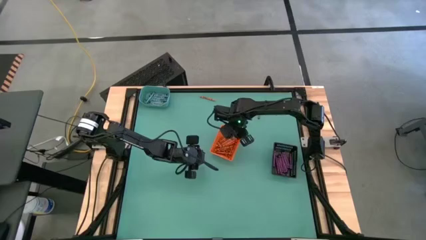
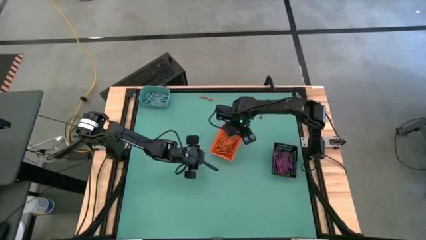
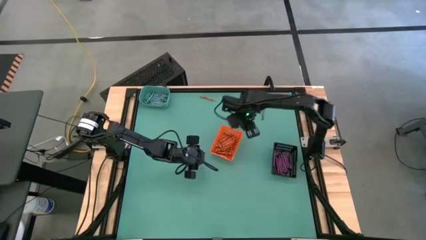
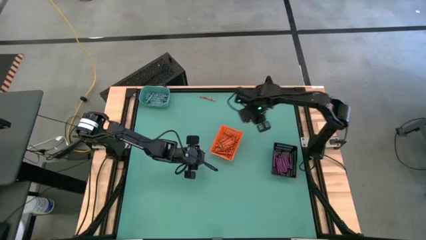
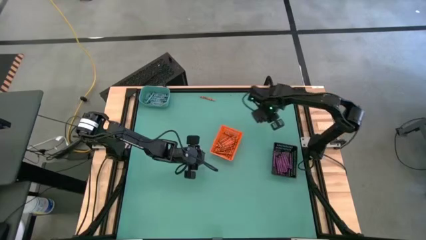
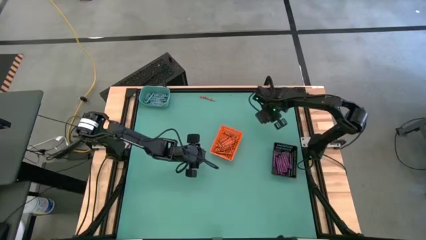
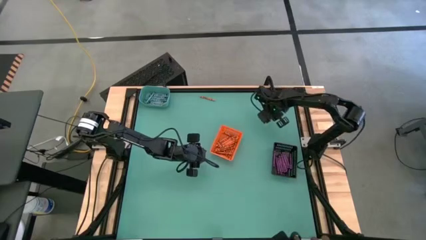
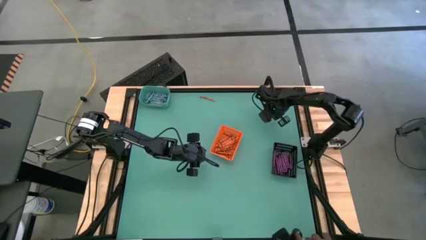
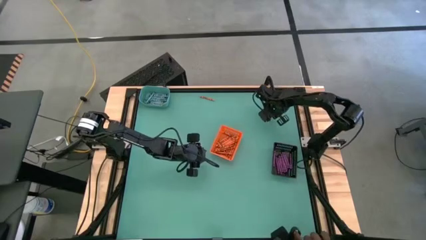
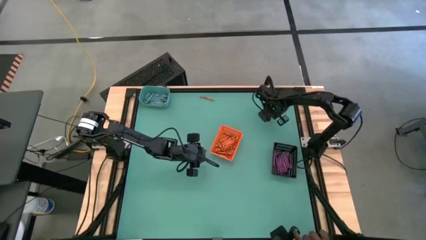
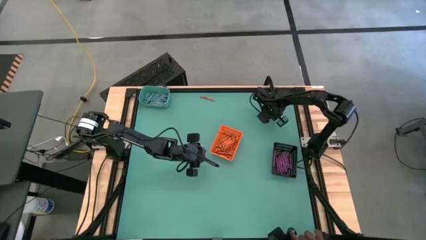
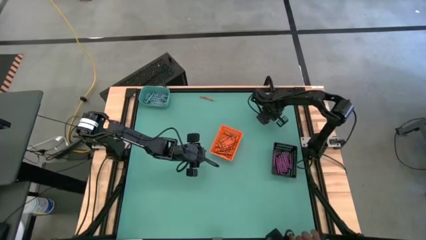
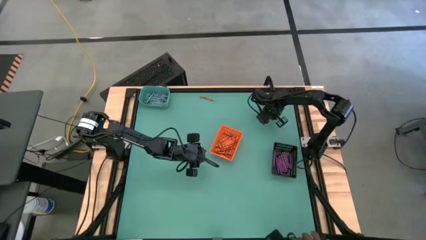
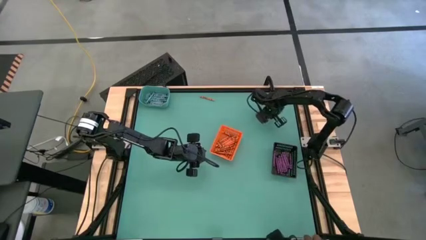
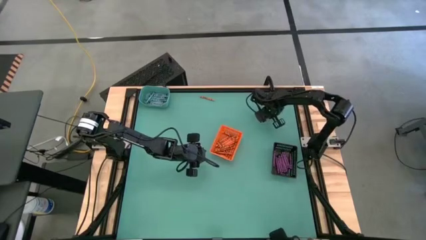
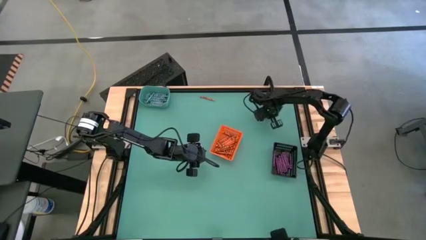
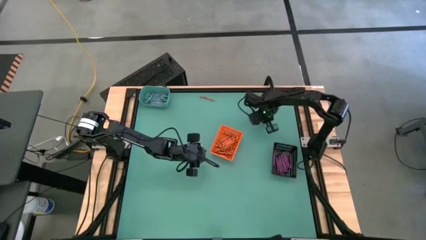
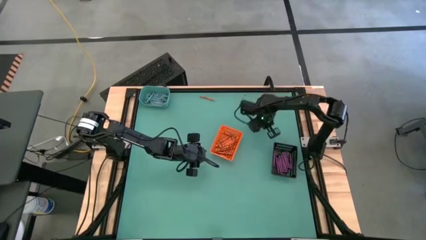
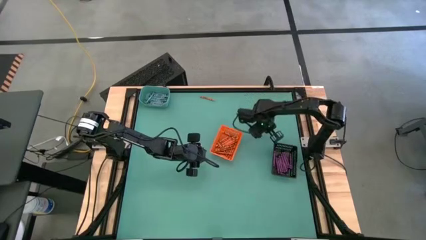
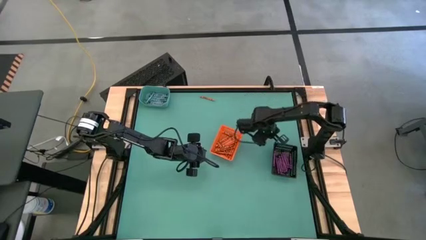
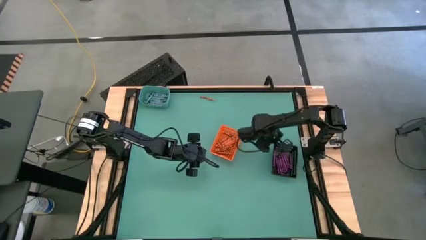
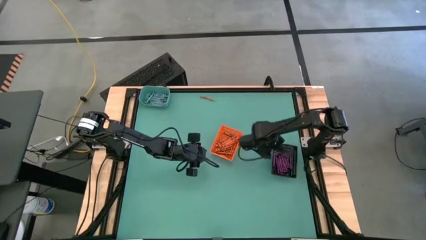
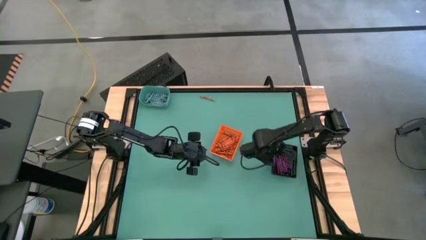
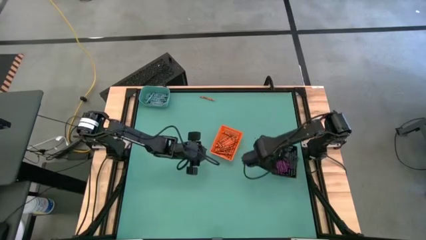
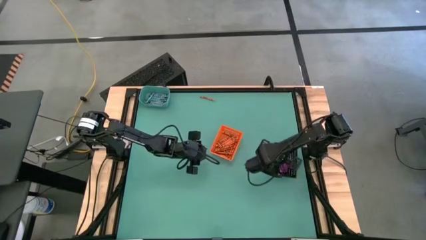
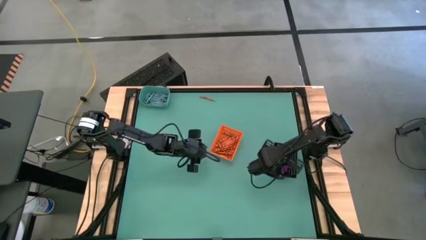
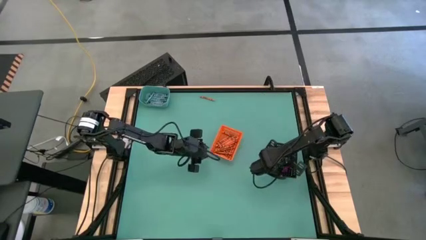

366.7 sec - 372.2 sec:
Task: Sort crayons
Put the violet crayon into black bin

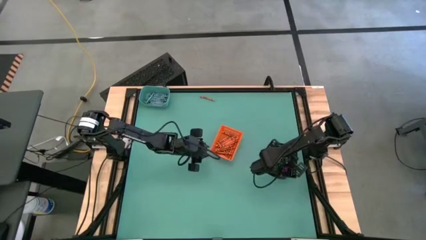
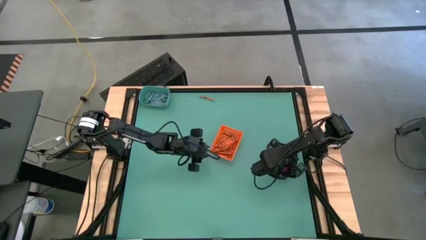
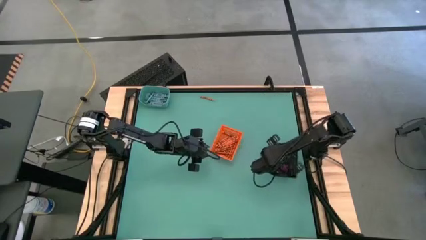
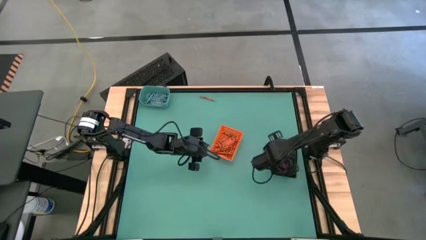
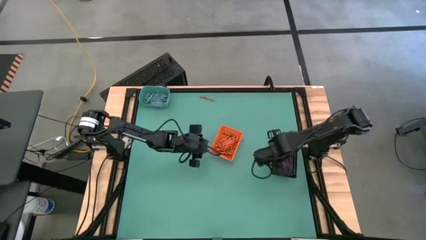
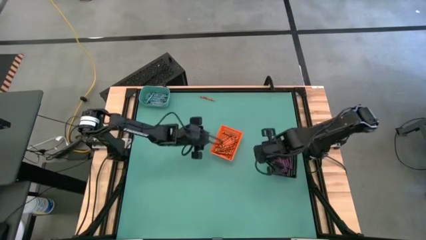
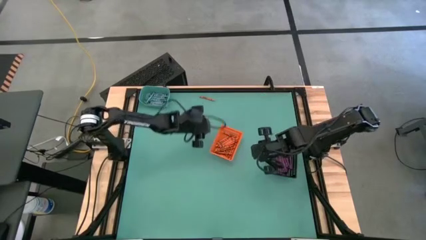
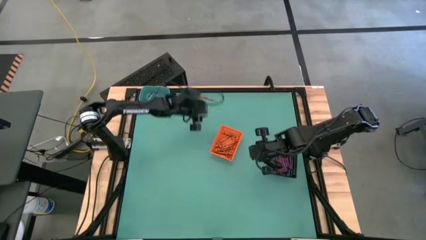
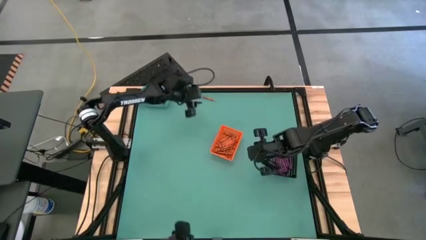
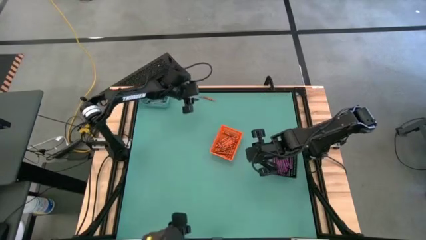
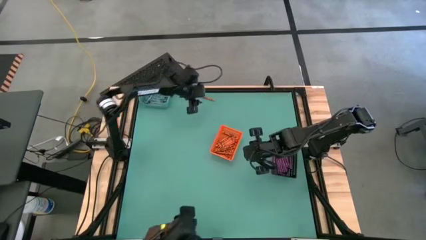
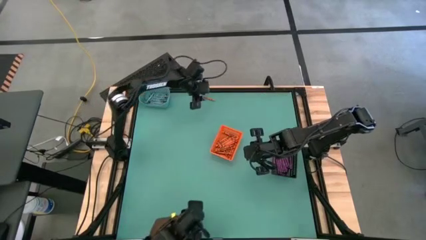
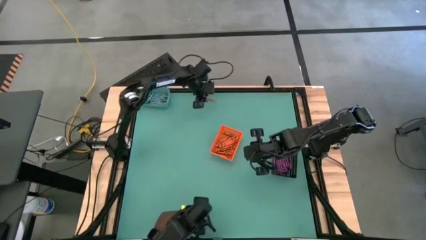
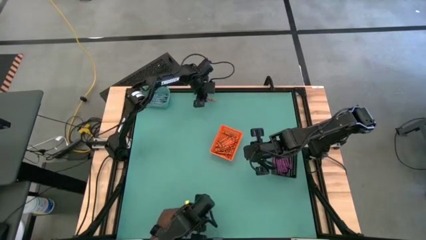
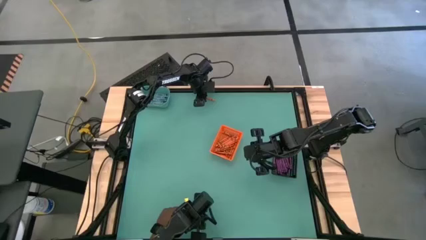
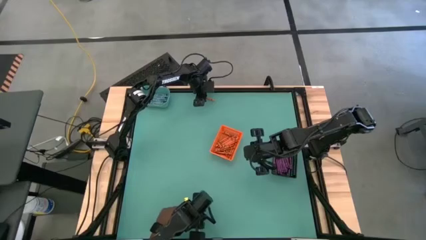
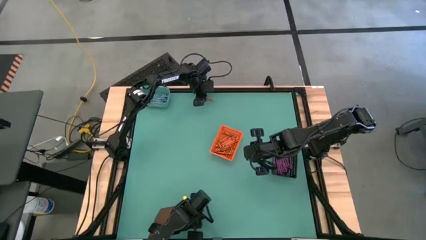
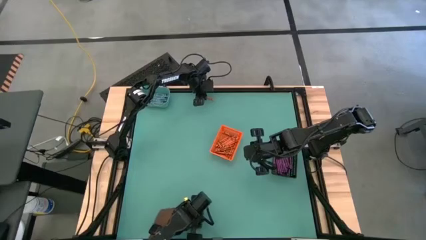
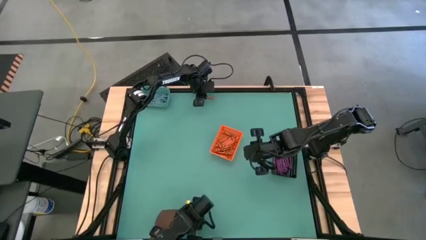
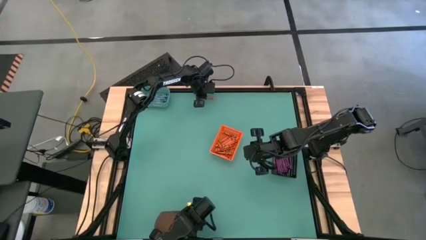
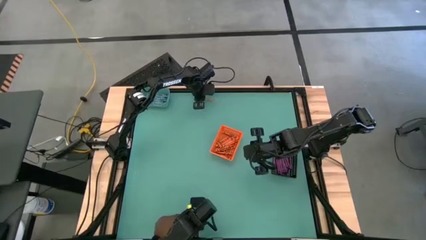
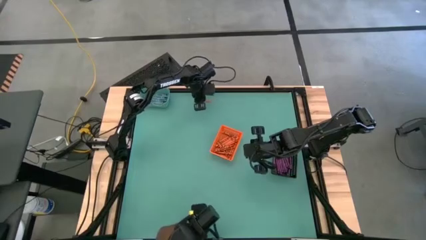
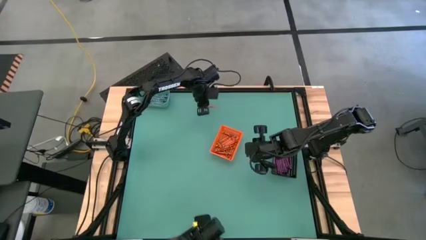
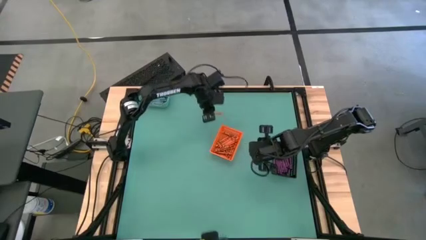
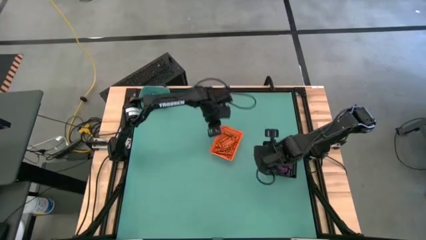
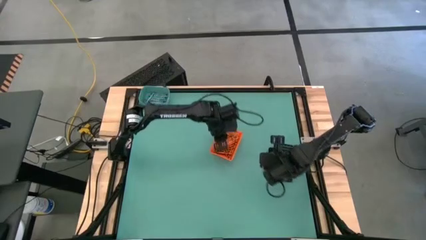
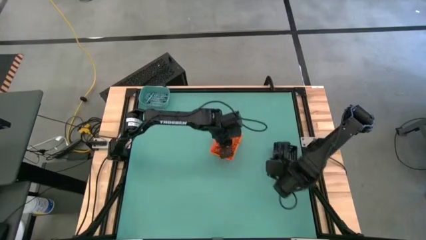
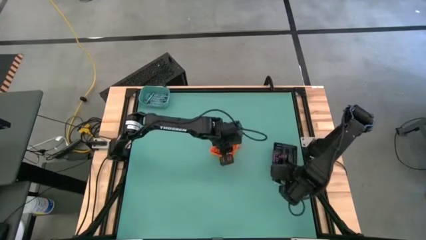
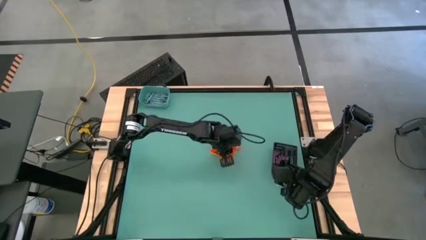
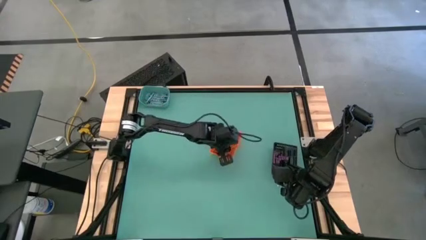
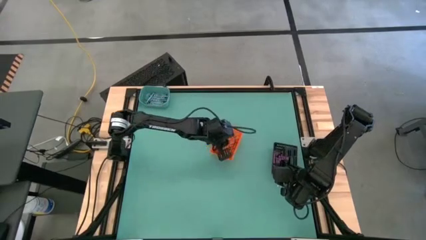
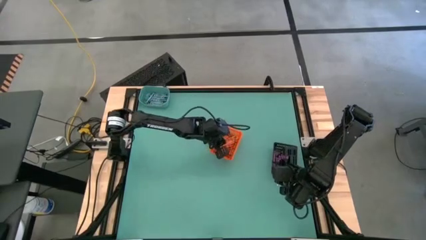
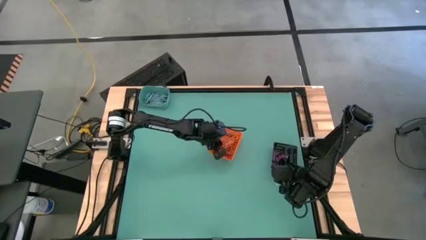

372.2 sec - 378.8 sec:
Put the orange crayon into the orange bin
